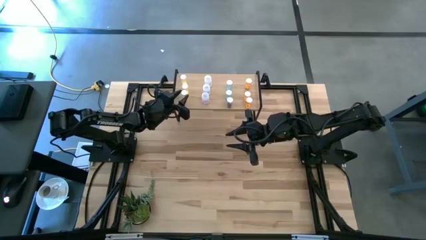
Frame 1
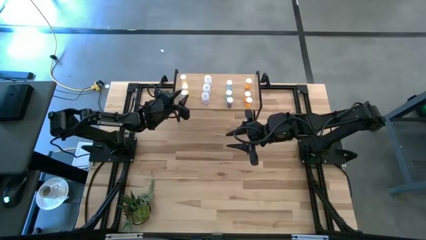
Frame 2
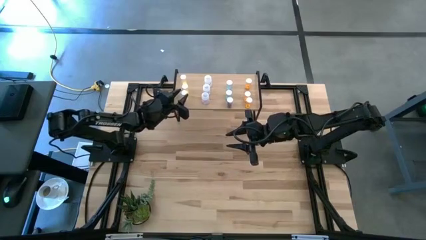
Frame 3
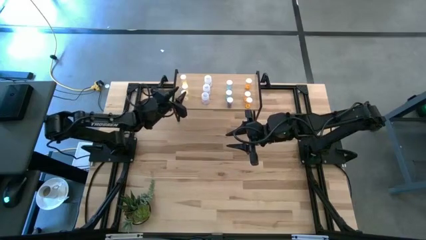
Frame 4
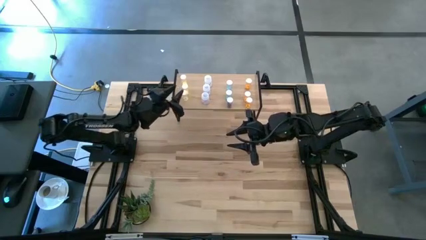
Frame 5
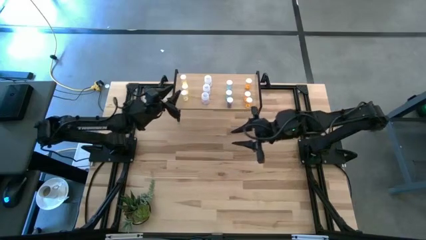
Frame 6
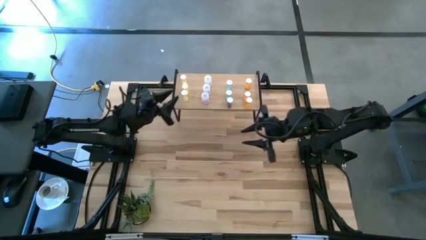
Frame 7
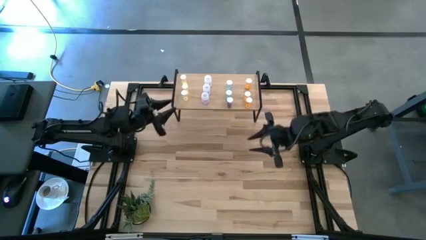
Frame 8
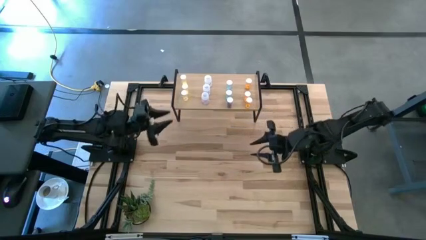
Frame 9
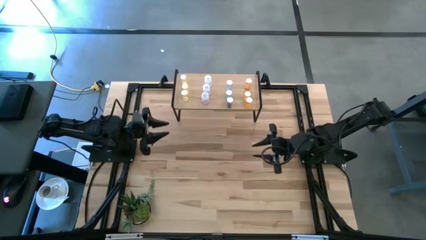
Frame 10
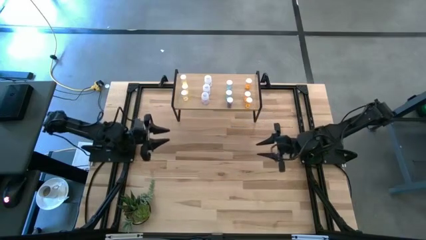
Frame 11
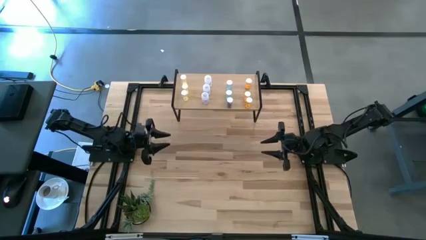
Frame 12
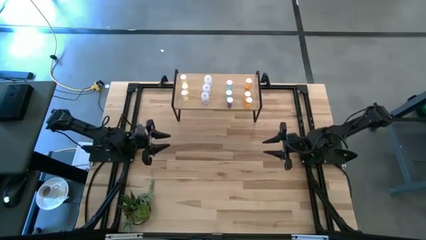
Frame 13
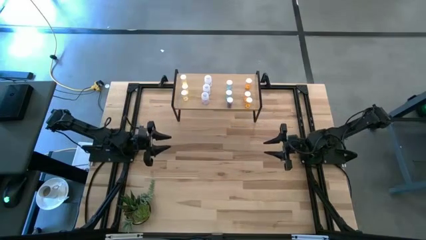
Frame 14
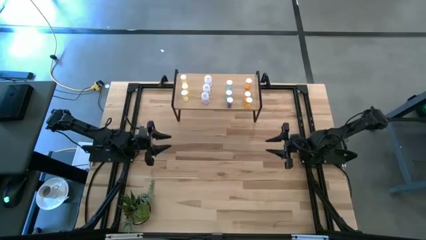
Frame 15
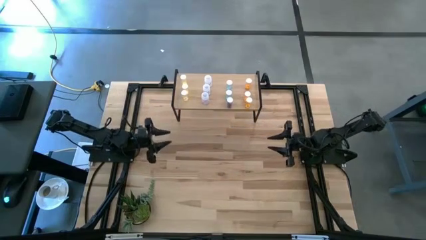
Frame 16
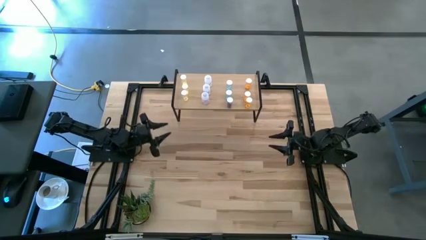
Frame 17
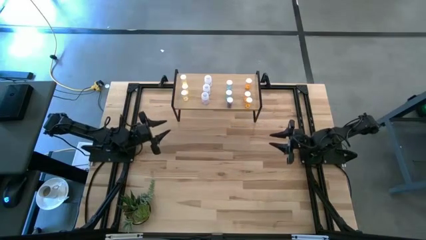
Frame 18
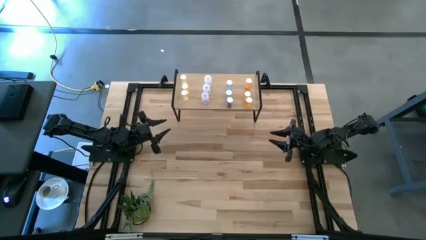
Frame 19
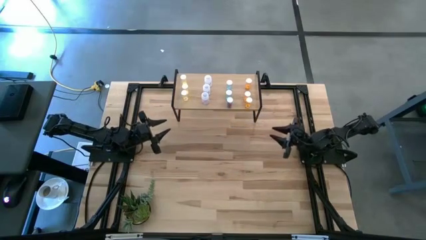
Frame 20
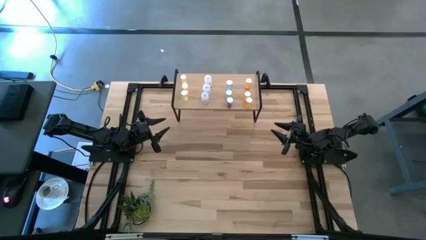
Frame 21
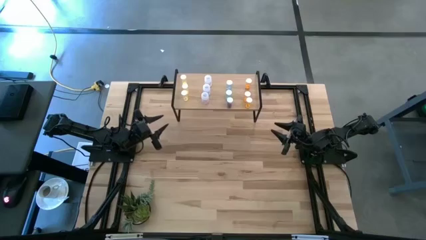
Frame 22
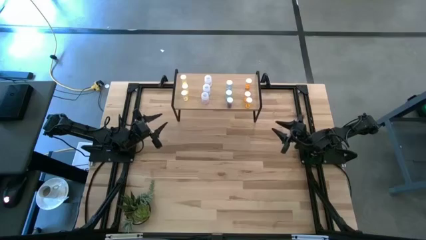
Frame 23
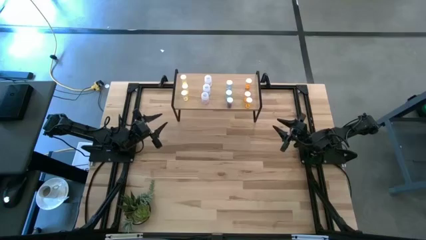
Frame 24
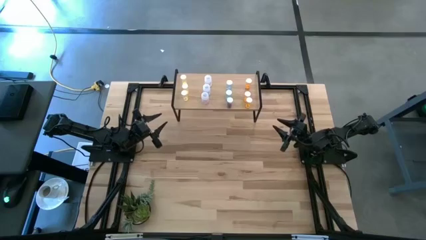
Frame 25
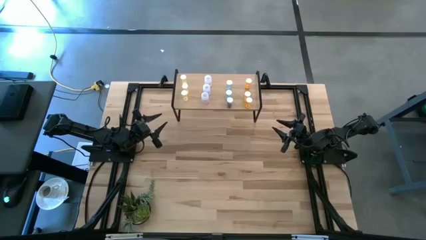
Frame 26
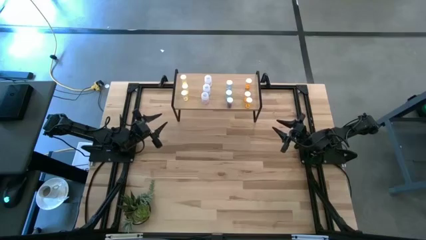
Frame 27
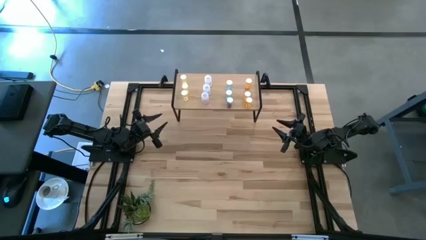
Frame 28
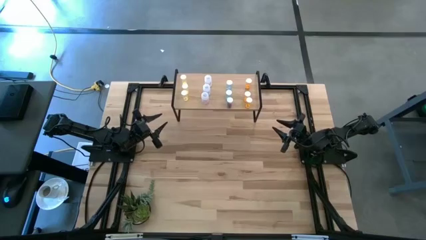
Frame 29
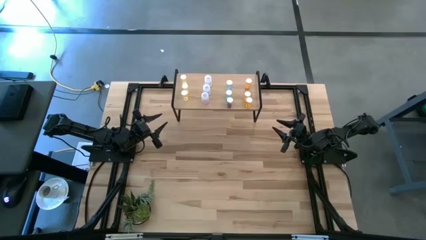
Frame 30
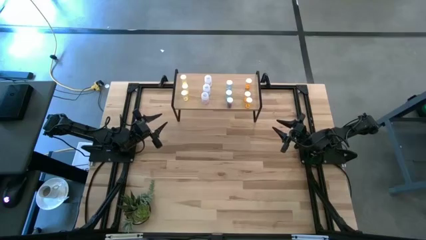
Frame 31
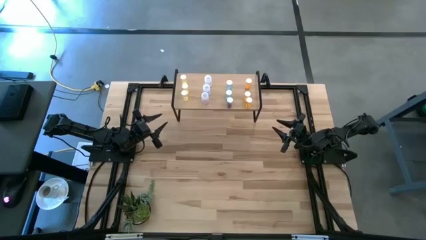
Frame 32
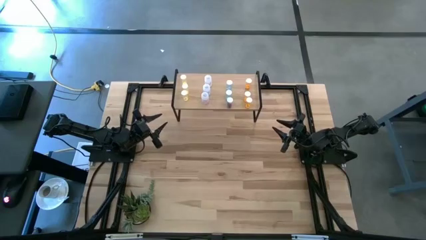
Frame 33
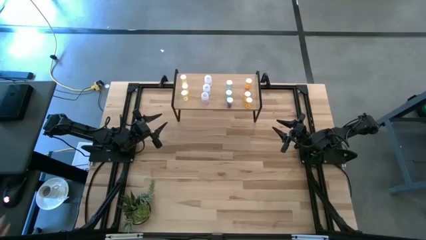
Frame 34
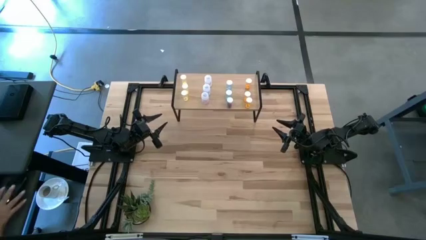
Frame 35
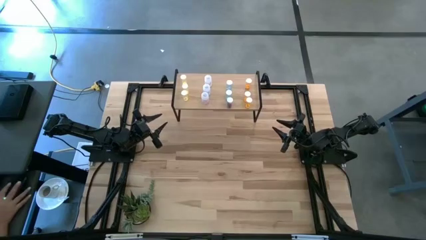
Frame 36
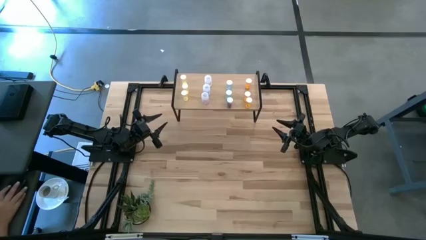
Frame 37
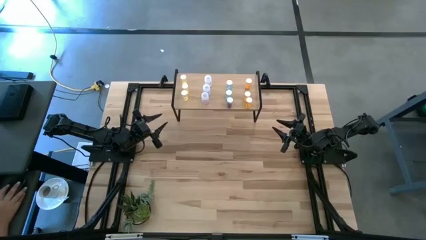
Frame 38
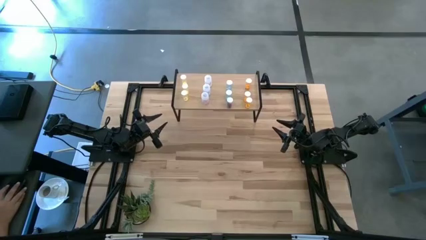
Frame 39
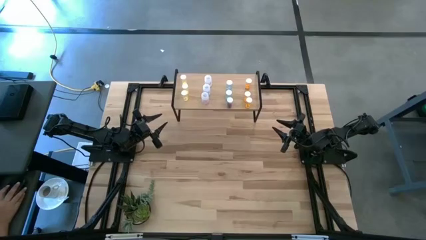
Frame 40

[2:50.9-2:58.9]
Task: Pick and place medicine bottles onto shelf by color
Return to Home Position

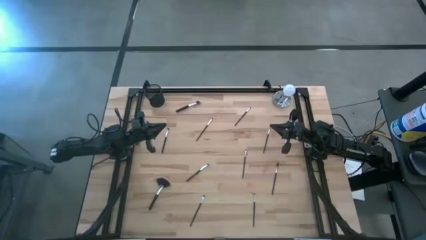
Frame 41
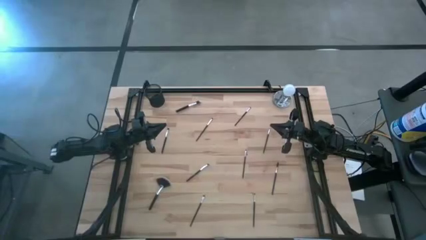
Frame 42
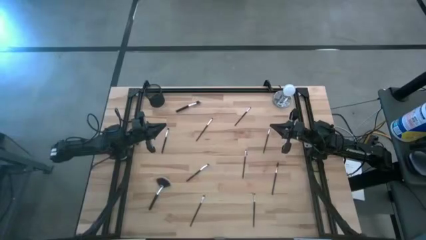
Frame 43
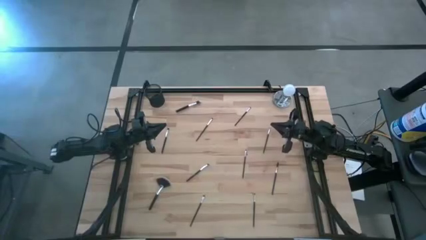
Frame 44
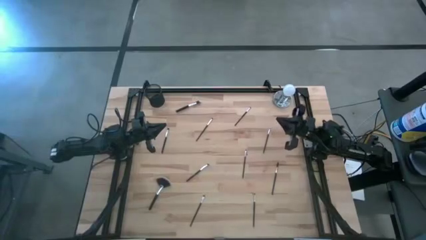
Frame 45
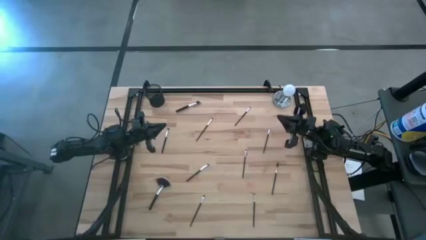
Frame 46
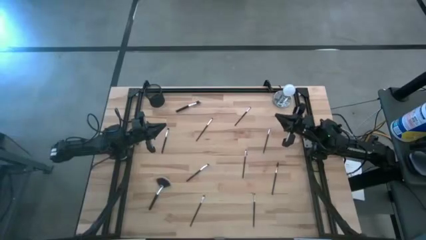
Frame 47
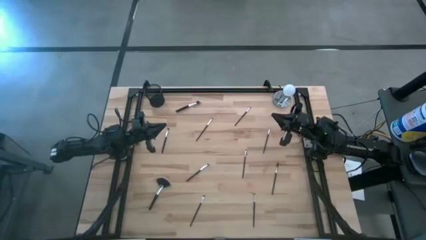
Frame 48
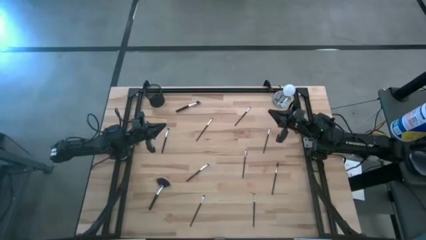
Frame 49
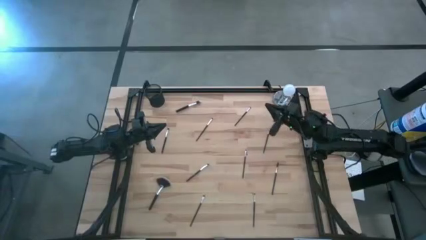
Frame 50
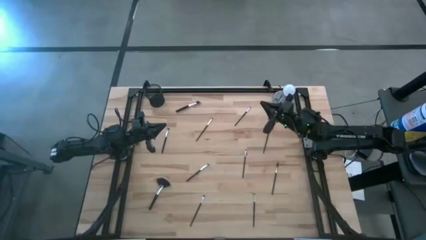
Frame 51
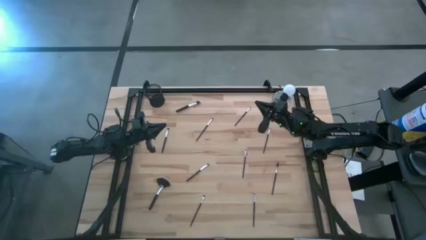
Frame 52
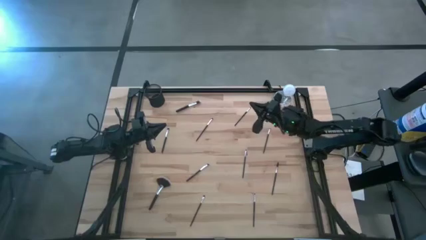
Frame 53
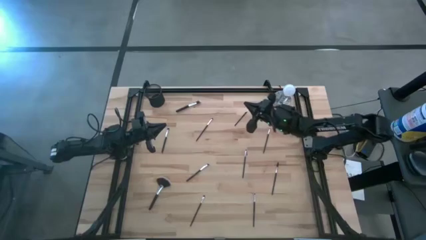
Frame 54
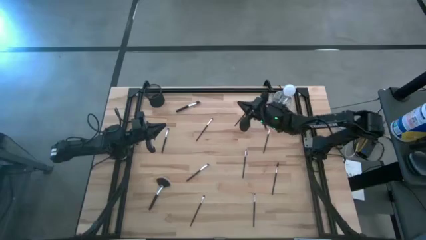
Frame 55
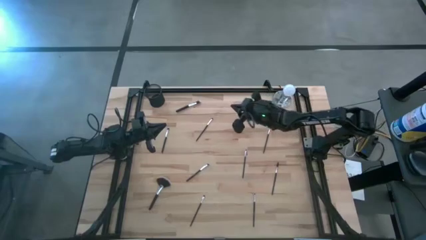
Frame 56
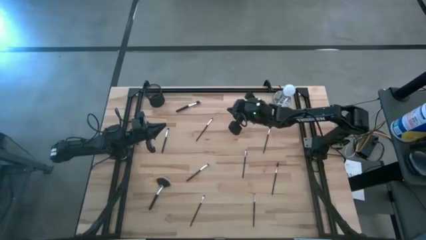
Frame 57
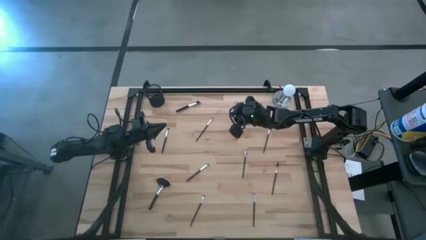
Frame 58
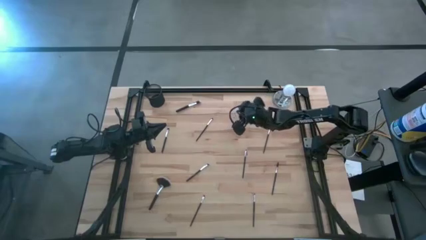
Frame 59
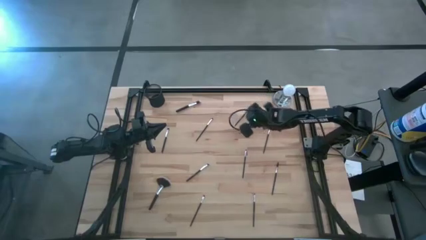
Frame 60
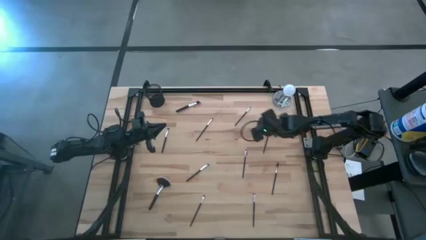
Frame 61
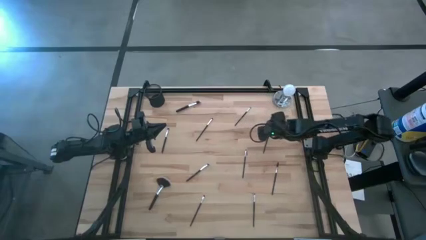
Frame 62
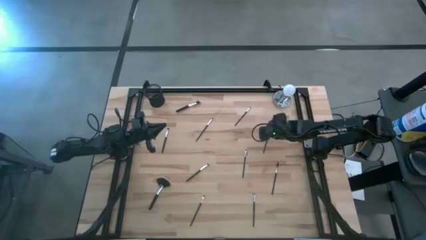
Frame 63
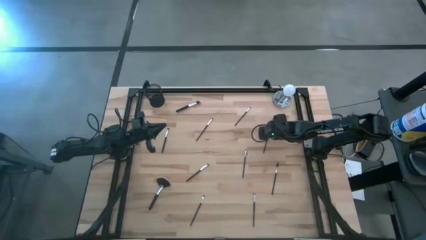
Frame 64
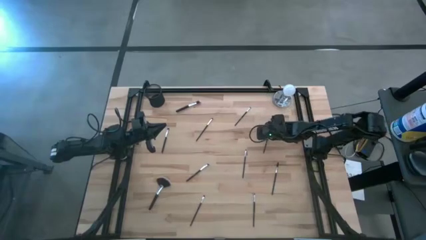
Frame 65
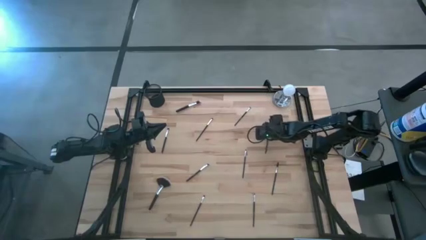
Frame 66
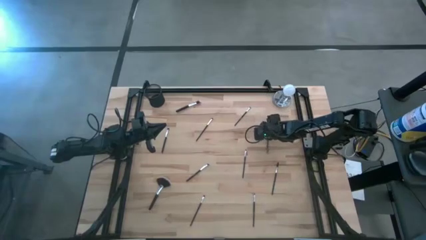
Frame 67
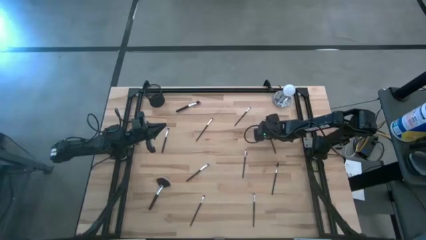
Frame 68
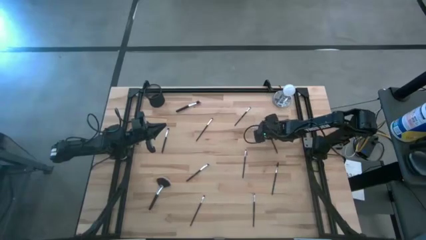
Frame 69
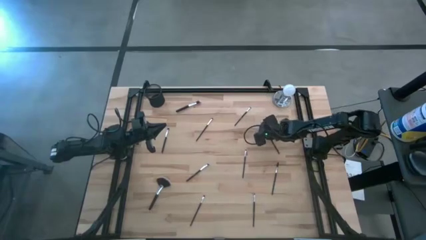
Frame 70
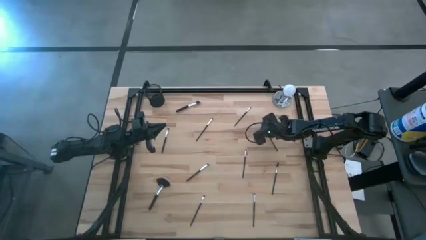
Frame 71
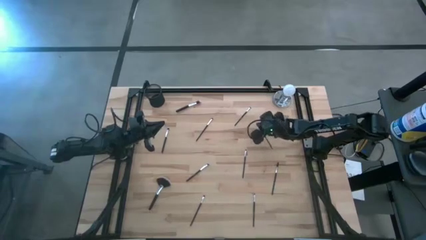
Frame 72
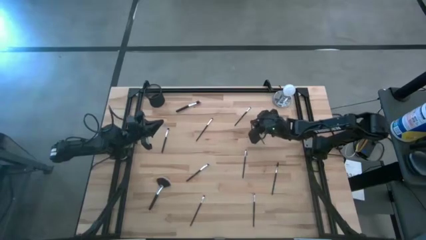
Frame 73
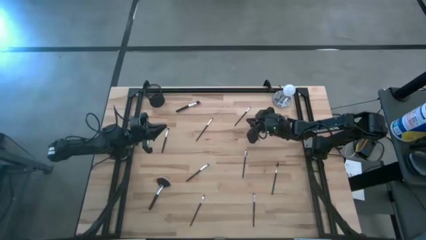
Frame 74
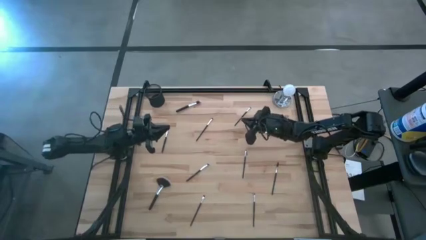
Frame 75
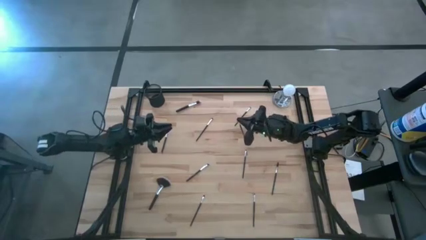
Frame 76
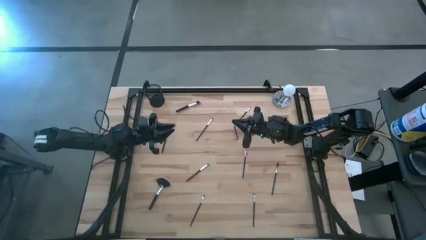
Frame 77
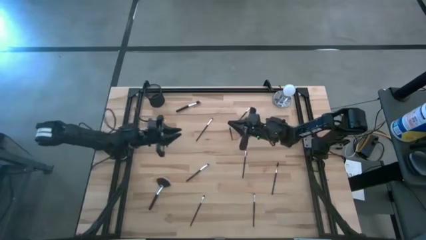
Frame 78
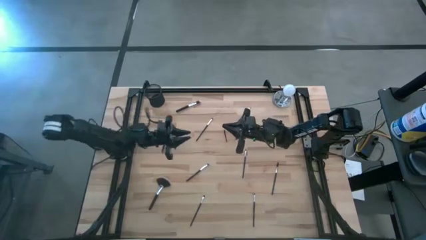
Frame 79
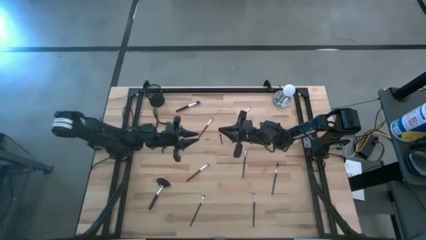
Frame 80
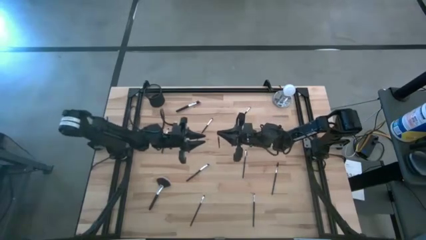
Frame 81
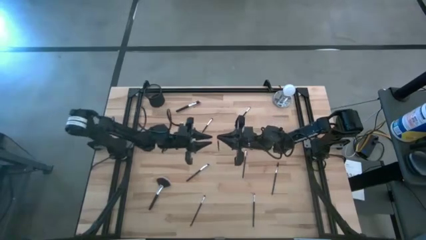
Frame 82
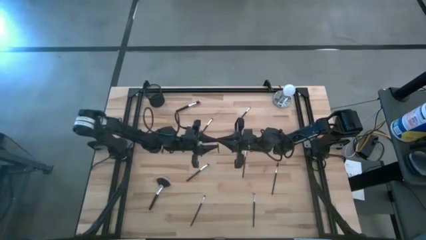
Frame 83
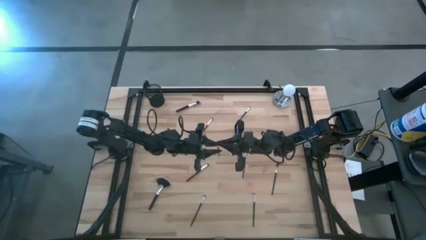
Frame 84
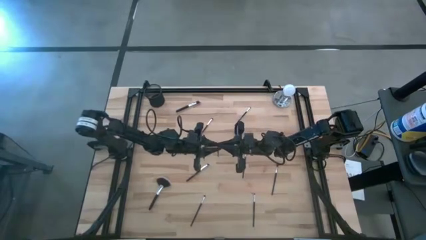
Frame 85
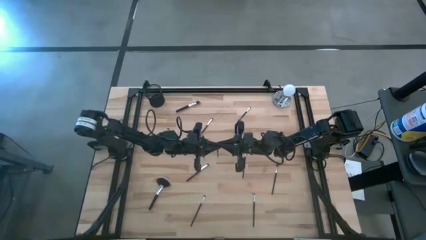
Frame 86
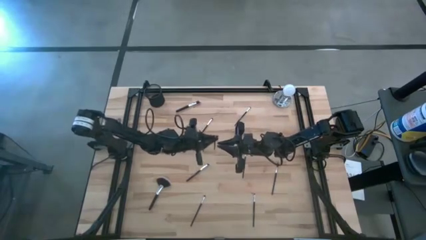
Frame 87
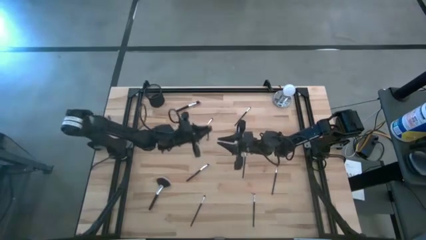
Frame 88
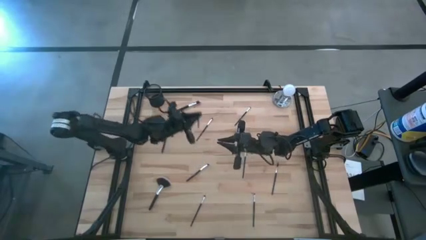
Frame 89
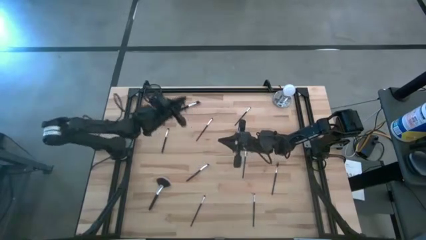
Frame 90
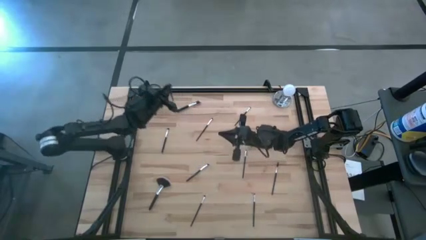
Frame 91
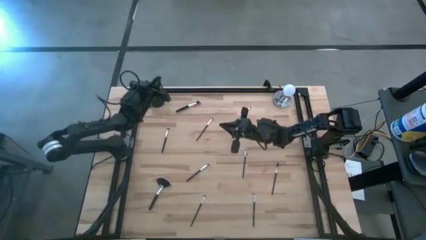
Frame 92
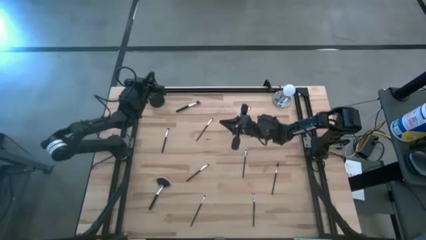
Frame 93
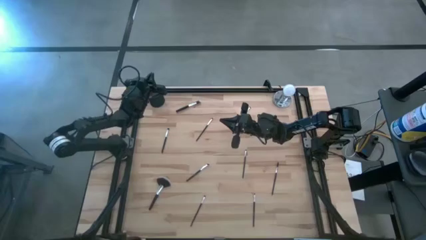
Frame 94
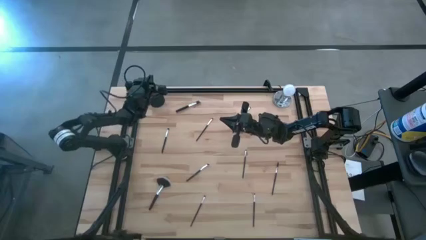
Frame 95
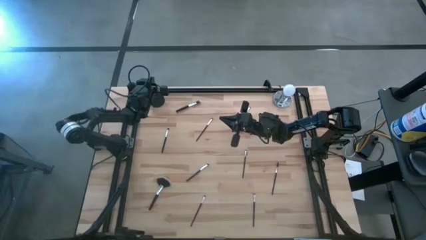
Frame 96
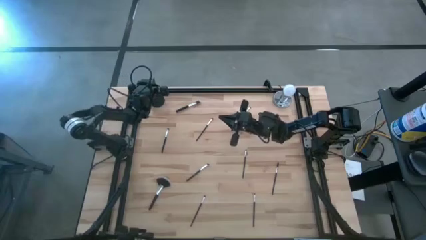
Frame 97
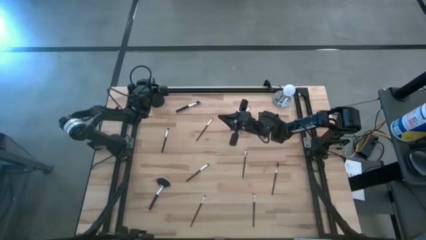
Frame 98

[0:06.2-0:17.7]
Task: Pick & Place Makeup Supplies
Put the makeup brush into the makeup holder
